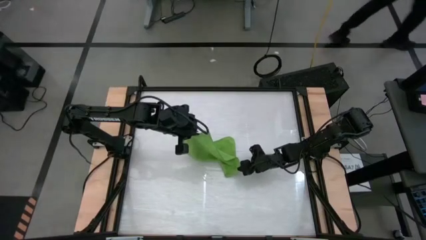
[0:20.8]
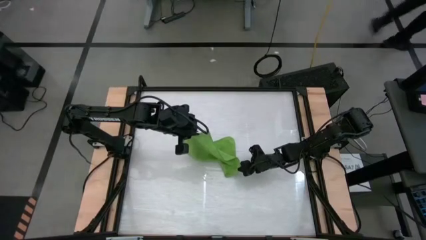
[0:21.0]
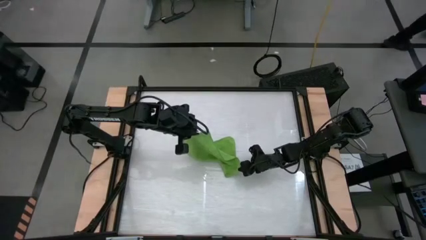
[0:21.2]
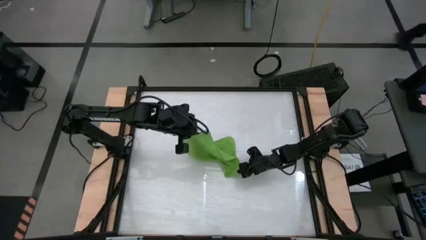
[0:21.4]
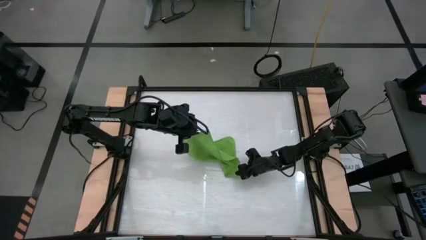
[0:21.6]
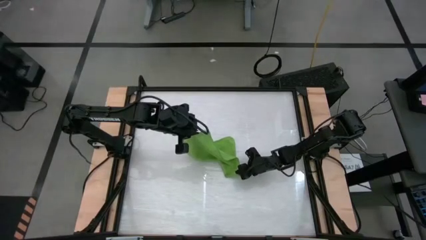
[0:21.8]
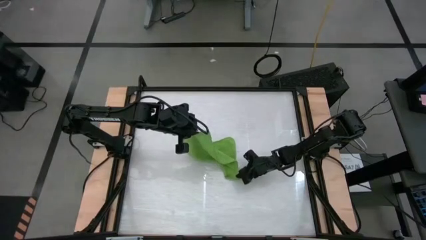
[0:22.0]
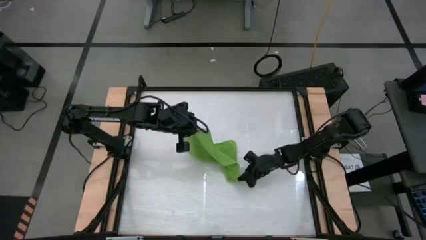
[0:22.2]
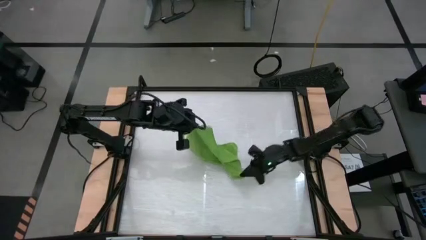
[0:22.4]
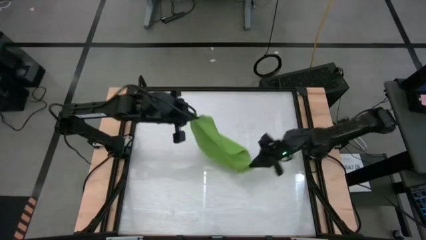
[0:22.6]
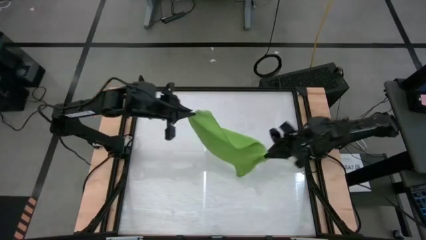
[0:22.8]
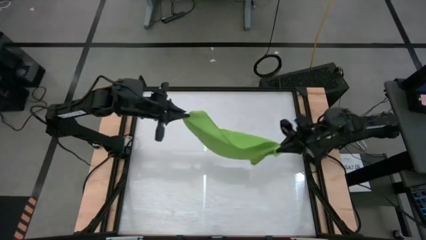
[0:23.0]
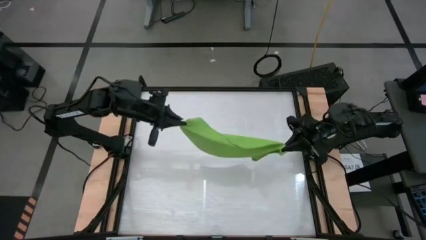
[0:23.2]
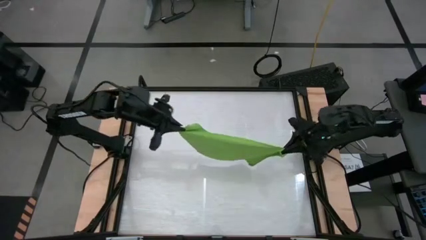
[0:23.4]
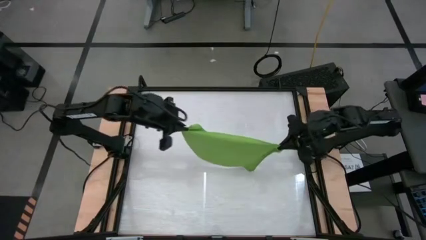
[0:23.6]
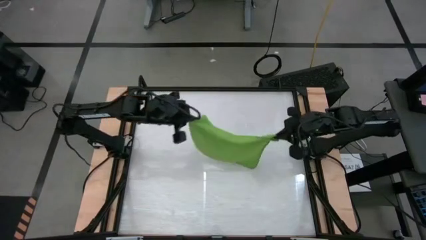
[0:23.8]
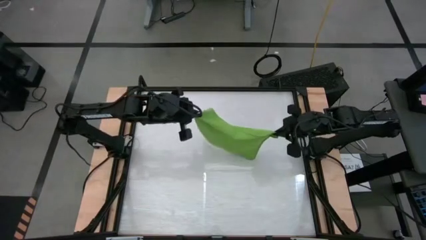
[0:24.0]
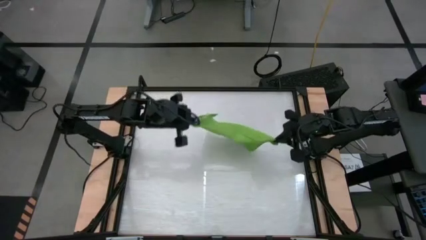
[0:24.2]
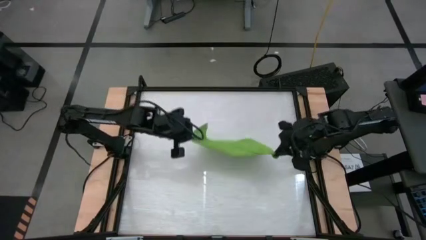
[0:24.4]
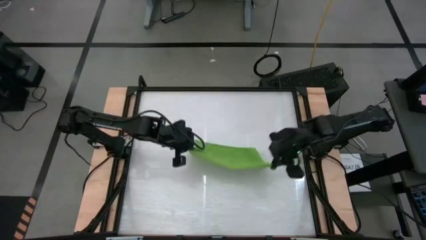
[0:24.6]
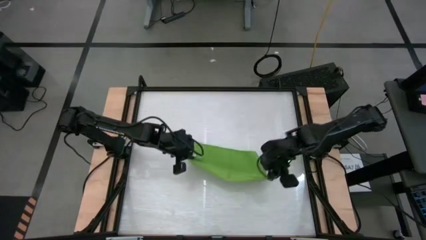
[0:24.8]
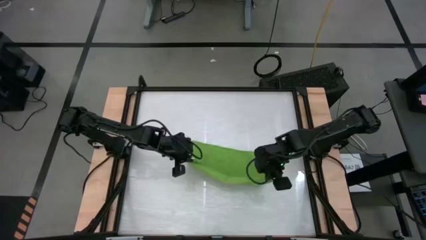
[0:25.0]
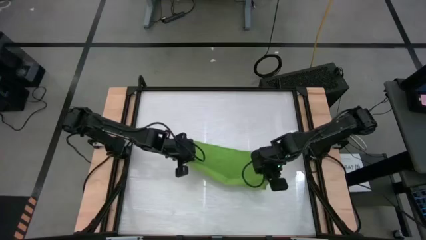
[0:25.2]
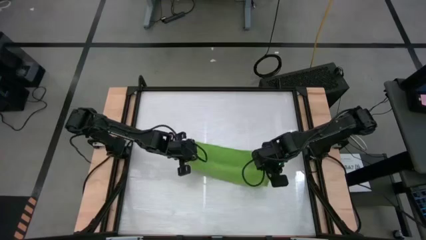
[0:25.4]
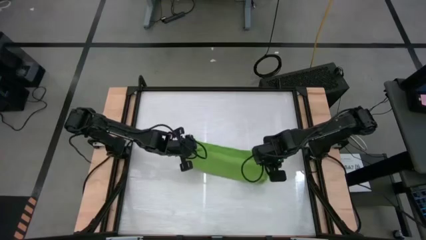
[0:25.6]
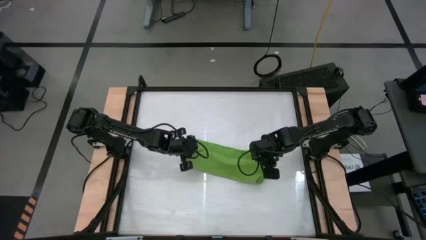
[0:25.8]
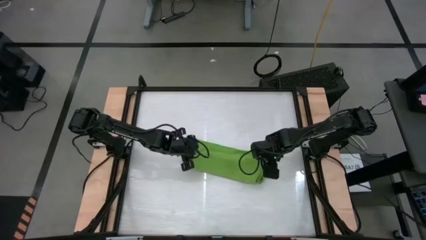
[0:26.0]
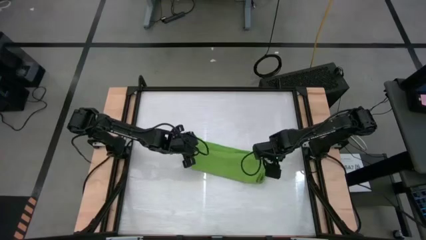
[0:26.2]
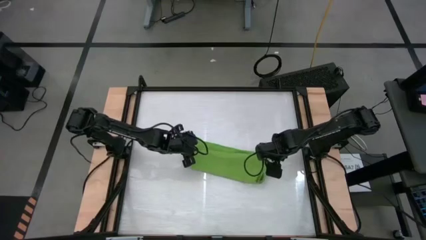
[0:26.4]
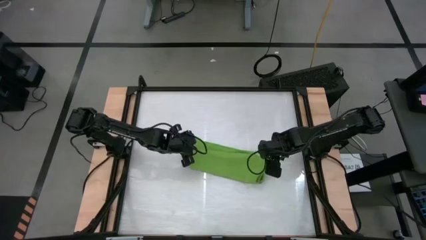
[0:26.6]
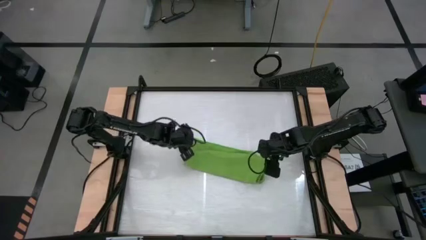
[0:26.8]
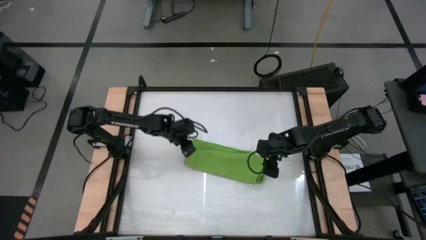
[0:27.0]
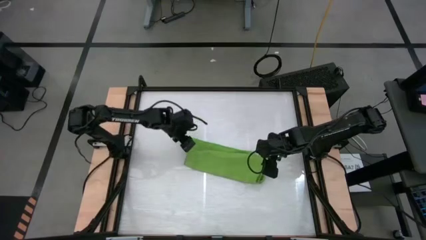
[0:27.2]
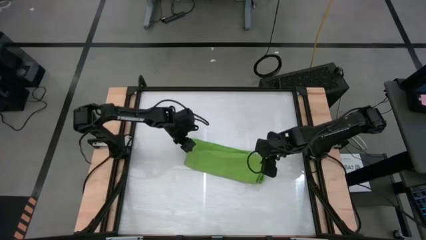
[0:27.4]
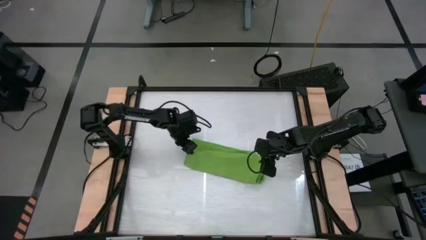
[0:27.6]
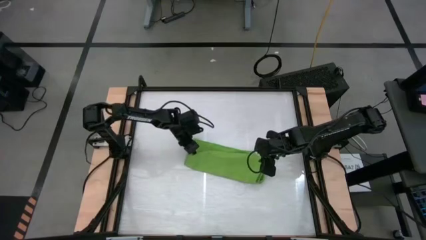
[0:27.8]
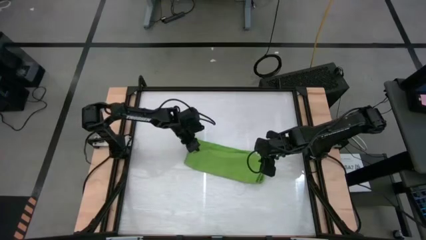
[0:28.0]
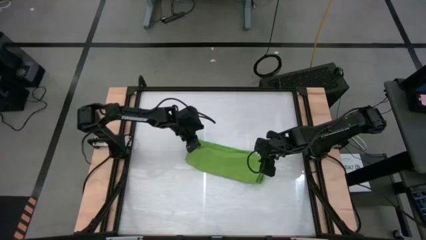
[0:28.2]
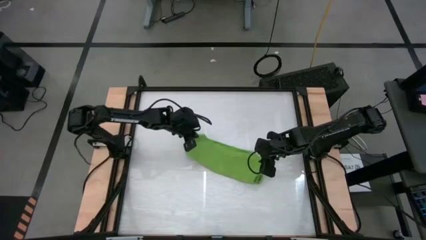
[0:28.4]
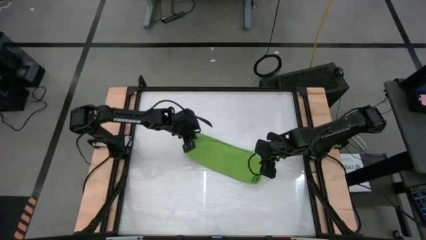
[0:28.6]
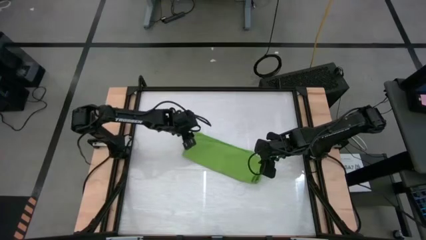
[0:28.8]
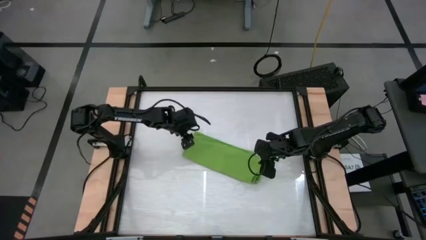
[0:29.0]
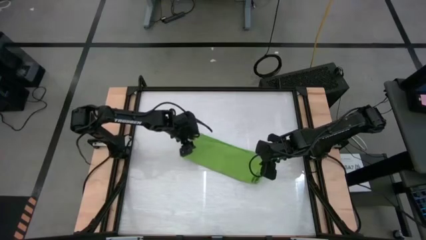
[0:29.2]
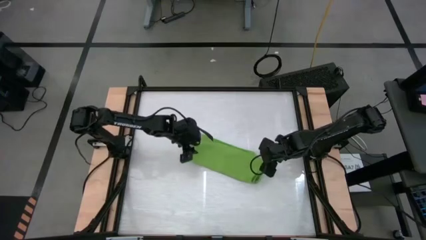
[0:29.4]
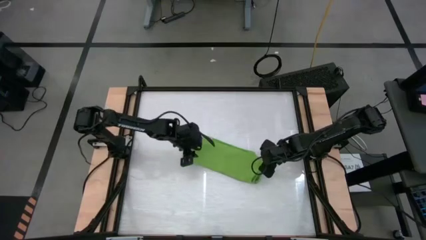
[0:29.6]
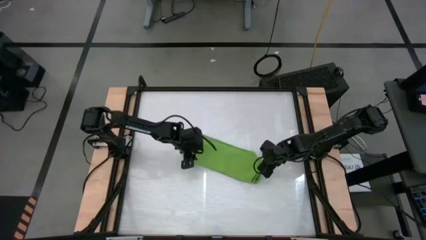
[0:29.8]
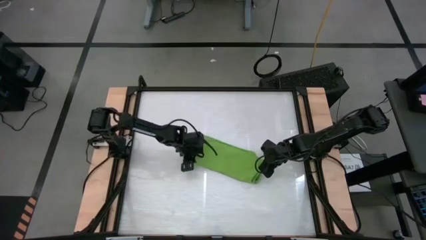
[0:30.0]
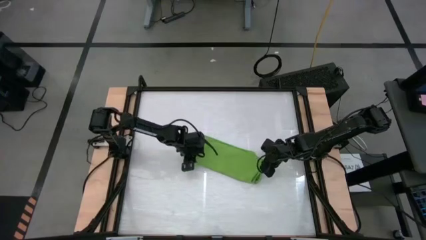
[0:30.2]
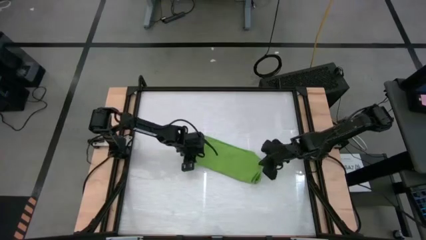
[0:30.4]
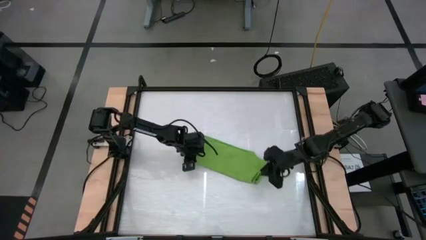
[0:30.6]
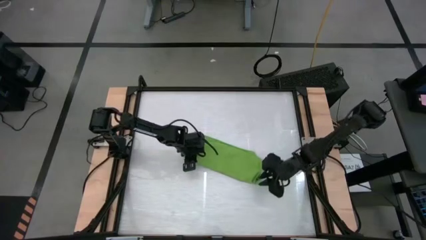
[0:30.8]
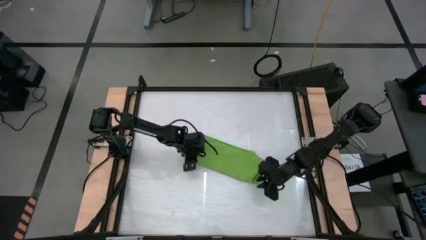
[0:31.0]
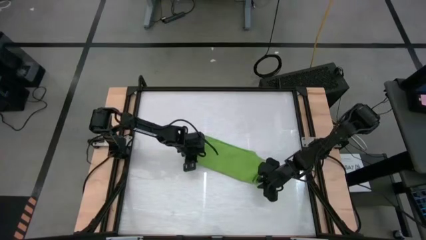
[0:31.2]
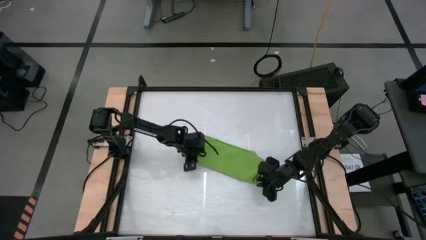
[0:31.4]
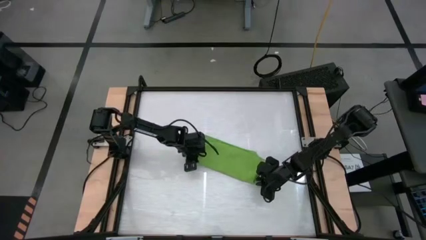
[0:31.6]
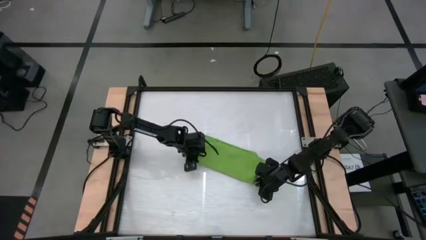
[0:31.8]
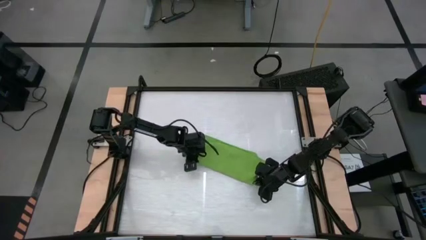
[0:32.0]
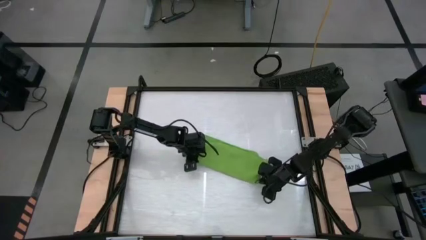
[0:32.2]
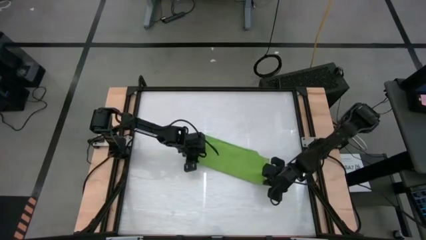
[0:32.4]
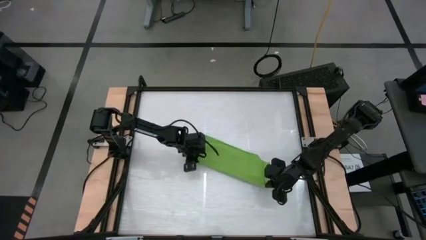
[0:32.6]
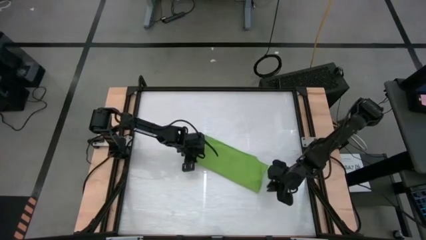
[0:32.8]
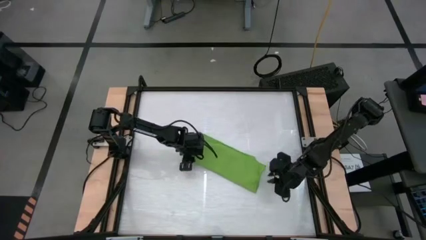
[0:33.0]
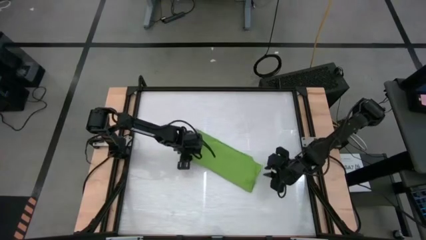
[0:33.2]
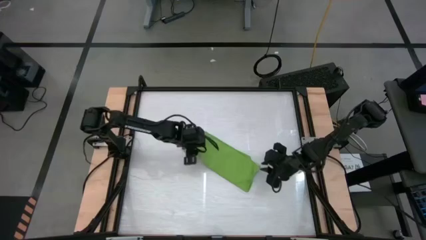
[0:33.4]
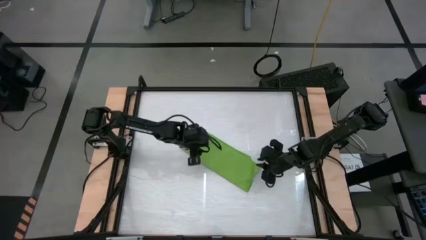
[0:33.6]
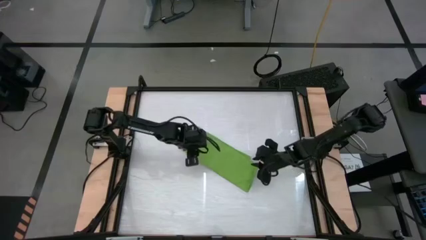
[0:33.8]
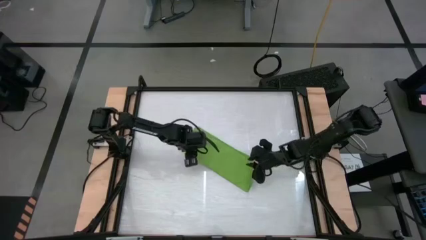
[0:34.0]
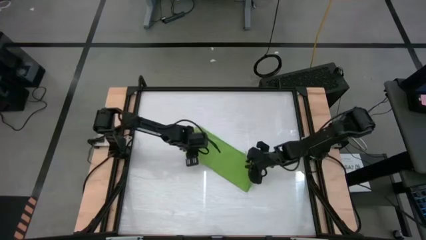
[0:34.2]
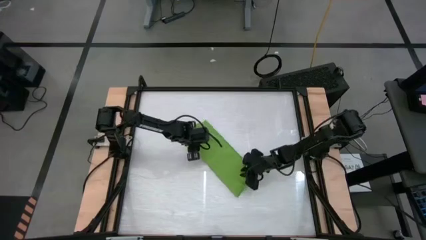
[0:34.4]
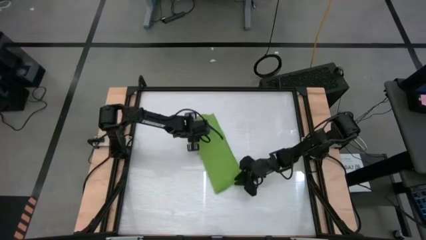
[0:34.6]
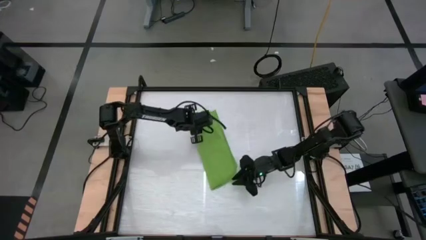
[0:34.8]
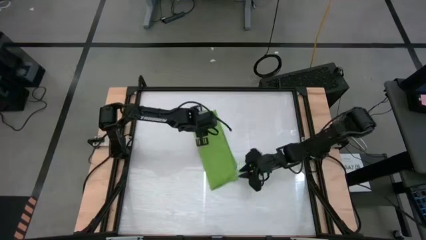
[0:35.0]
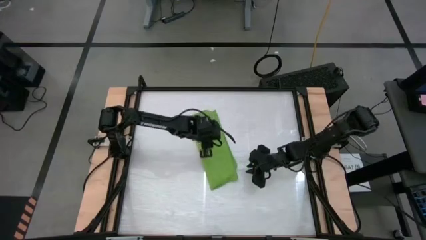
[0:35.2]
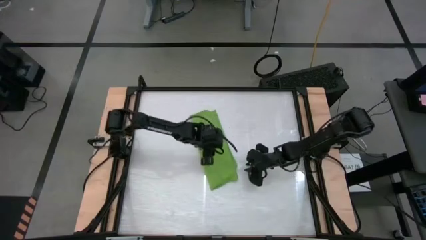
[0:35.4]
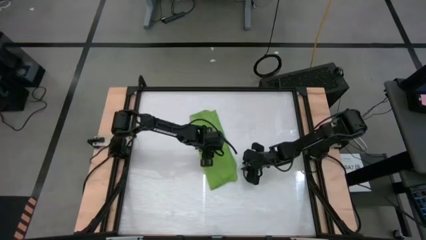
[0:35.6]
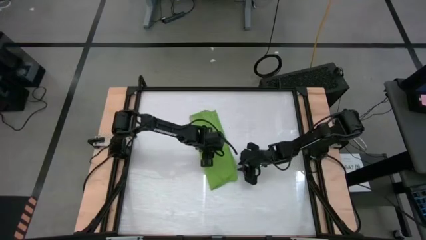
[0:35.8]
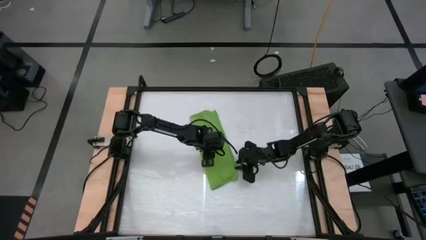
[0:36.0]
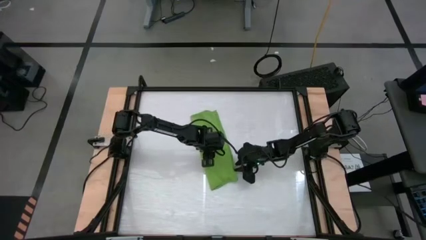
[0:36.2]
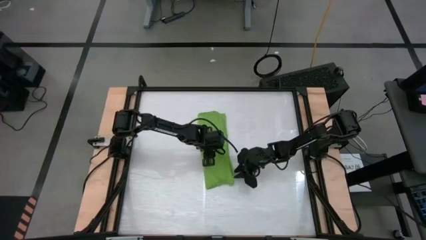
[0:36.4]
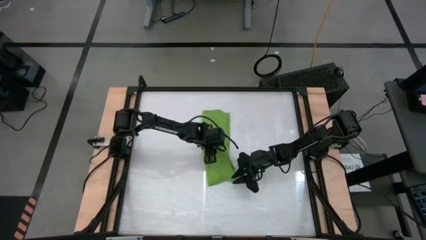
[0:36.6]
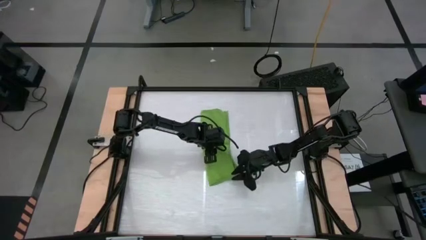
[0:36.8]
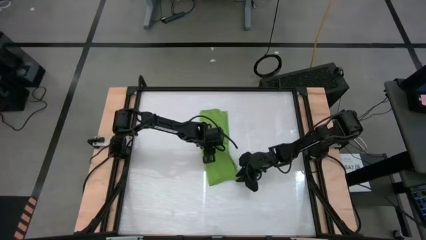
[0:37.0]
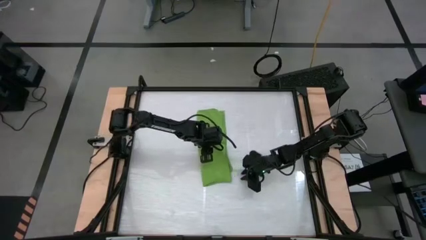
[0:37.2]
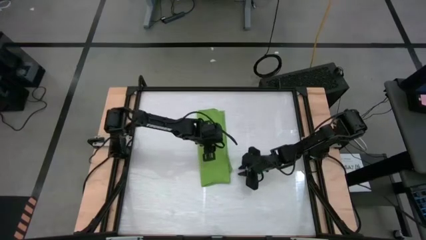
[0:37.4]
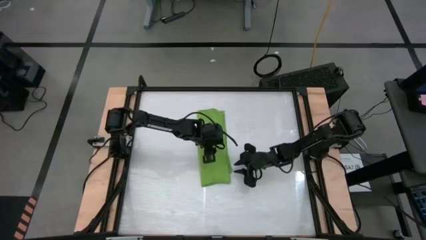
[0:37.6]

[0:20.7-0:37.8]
Task: Roll towel into tight, uniform cylinder
Roll the green towel
